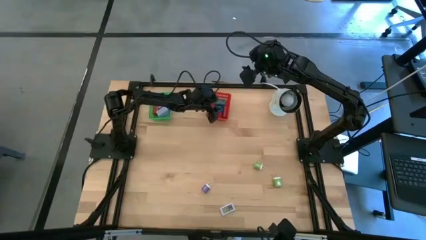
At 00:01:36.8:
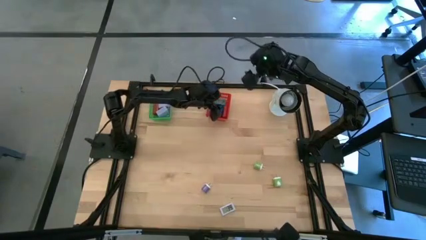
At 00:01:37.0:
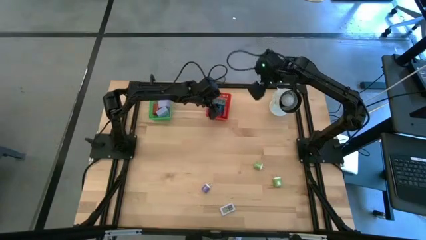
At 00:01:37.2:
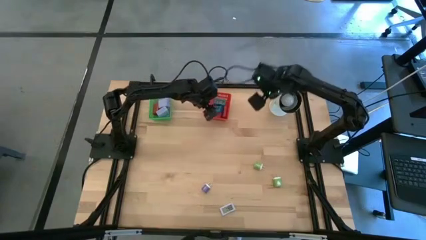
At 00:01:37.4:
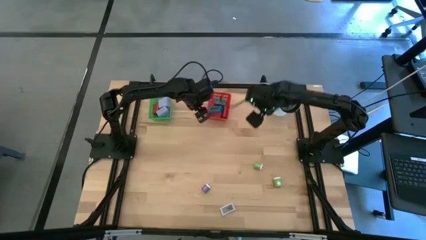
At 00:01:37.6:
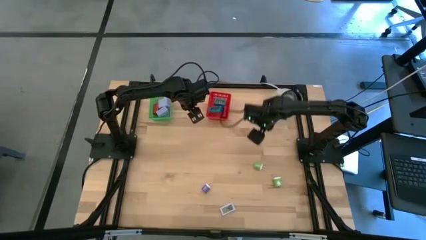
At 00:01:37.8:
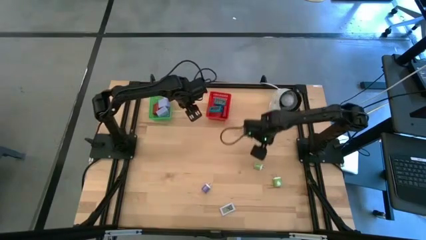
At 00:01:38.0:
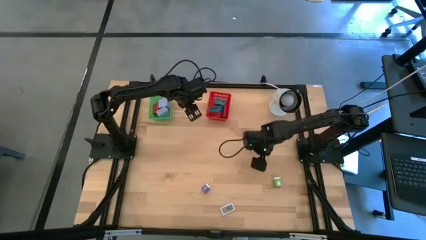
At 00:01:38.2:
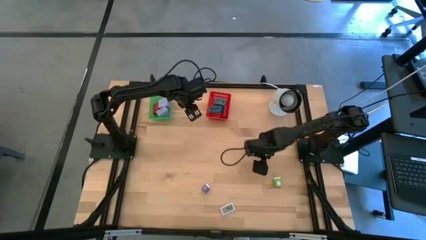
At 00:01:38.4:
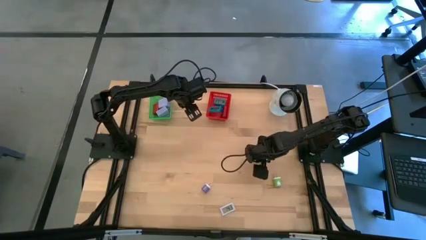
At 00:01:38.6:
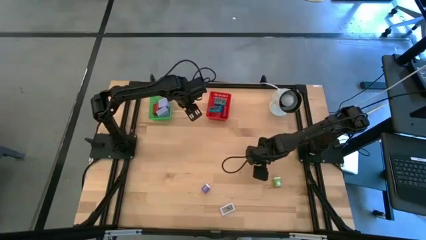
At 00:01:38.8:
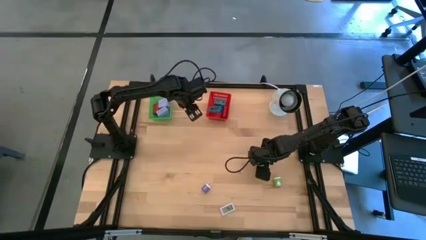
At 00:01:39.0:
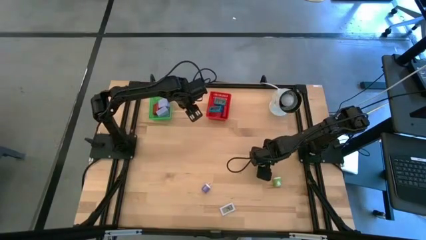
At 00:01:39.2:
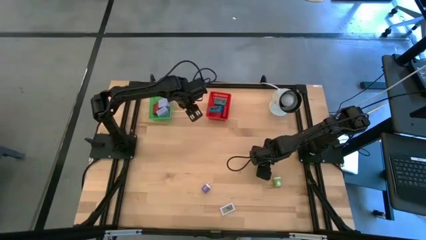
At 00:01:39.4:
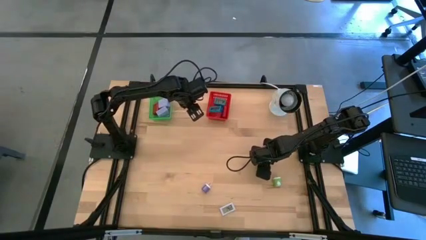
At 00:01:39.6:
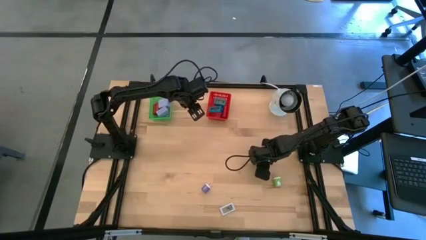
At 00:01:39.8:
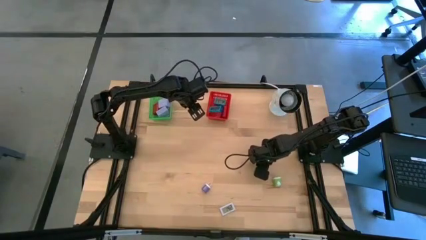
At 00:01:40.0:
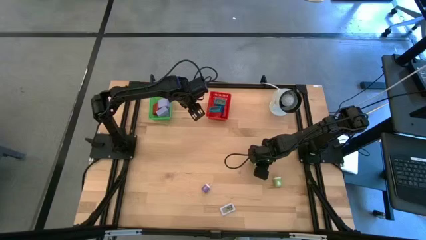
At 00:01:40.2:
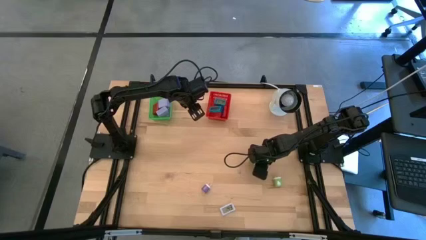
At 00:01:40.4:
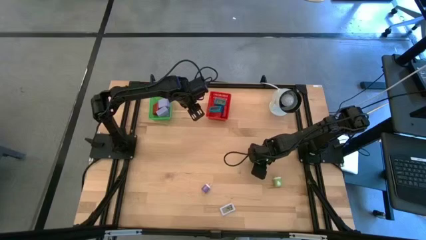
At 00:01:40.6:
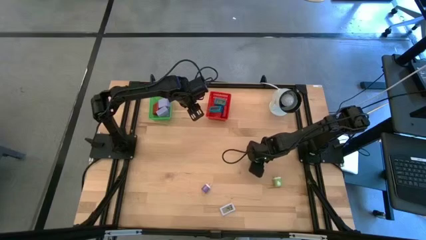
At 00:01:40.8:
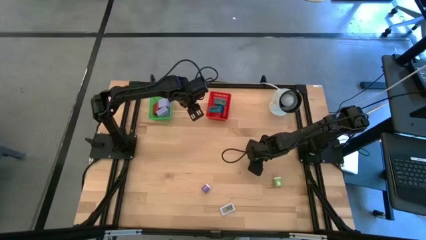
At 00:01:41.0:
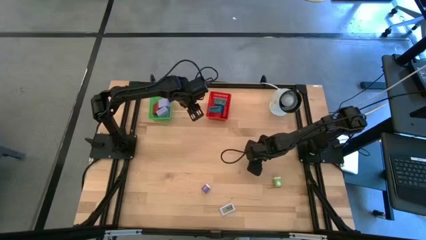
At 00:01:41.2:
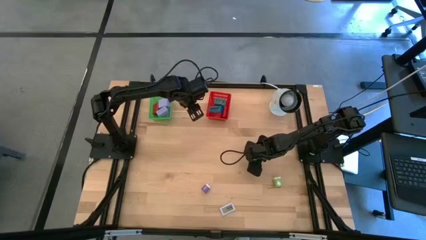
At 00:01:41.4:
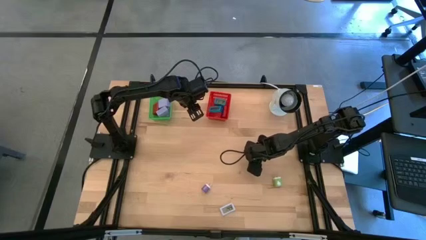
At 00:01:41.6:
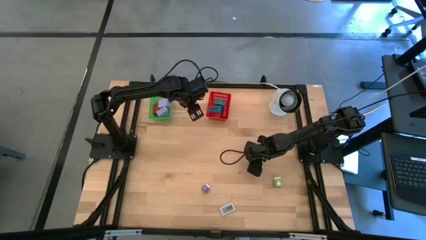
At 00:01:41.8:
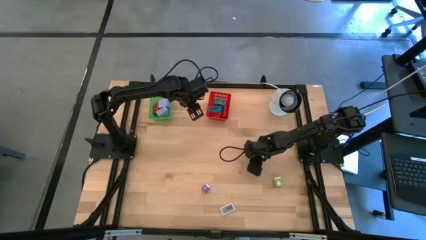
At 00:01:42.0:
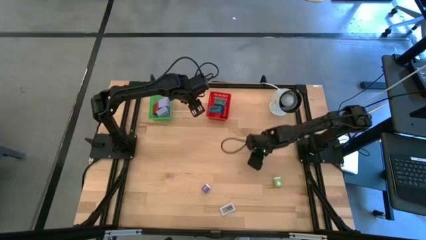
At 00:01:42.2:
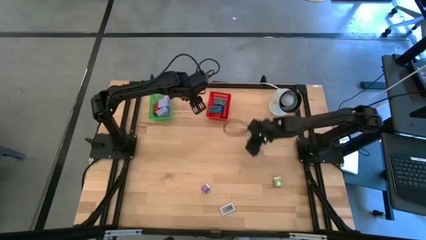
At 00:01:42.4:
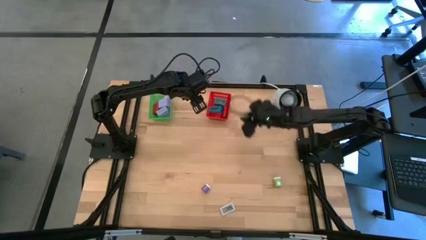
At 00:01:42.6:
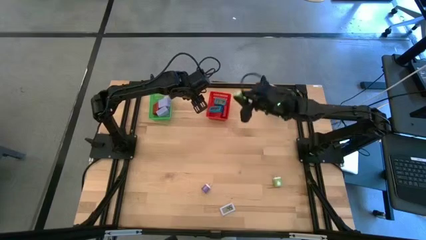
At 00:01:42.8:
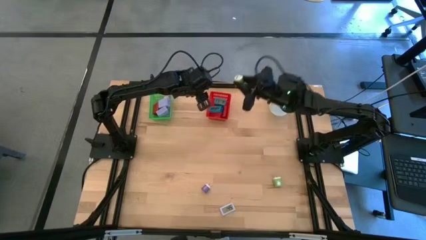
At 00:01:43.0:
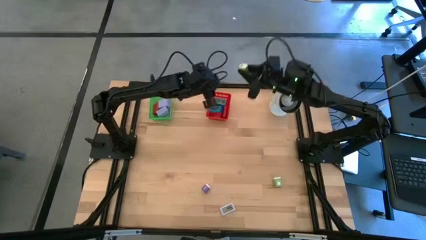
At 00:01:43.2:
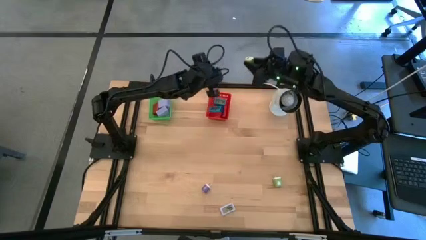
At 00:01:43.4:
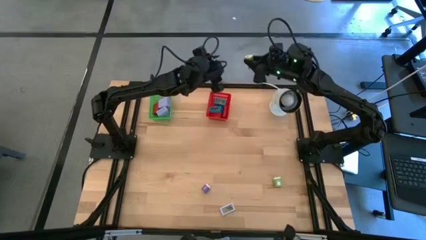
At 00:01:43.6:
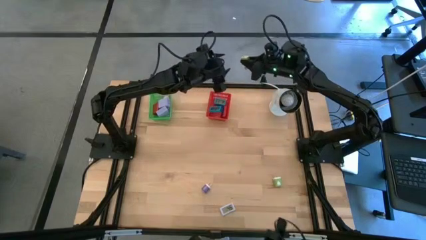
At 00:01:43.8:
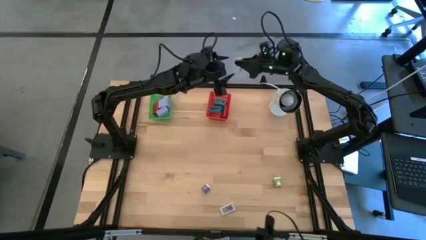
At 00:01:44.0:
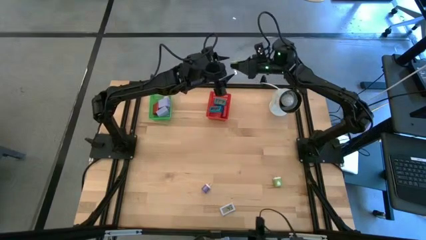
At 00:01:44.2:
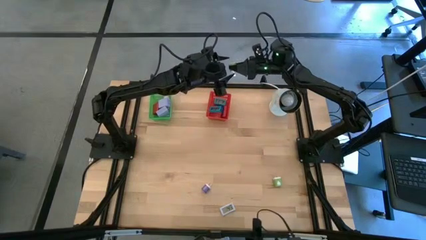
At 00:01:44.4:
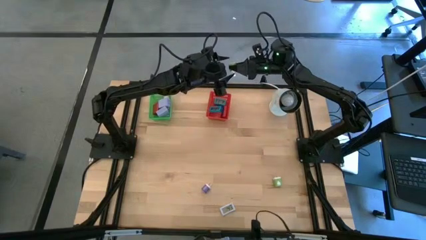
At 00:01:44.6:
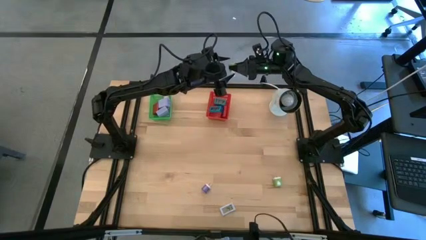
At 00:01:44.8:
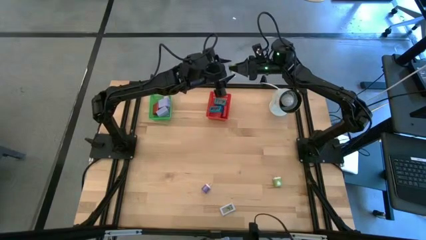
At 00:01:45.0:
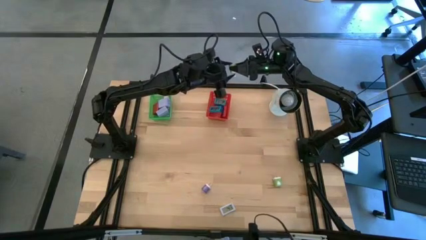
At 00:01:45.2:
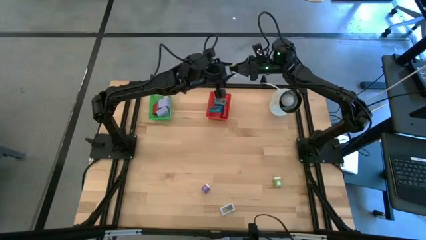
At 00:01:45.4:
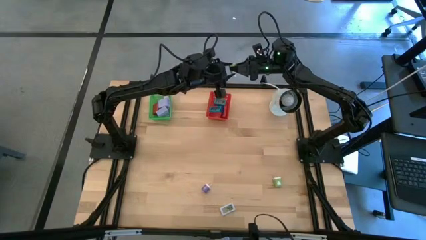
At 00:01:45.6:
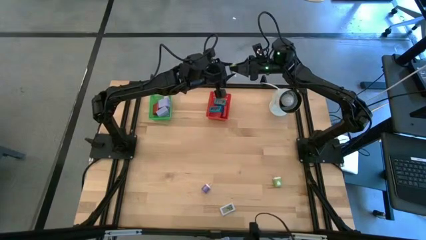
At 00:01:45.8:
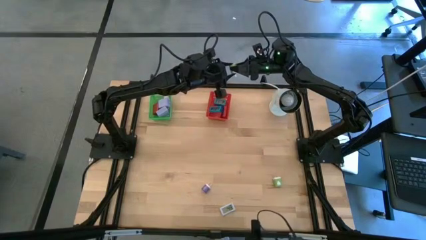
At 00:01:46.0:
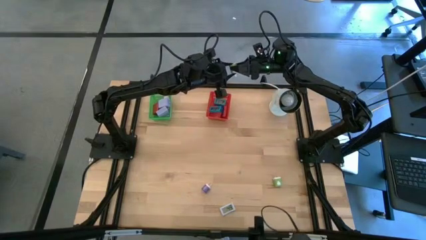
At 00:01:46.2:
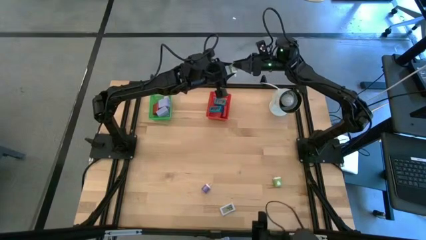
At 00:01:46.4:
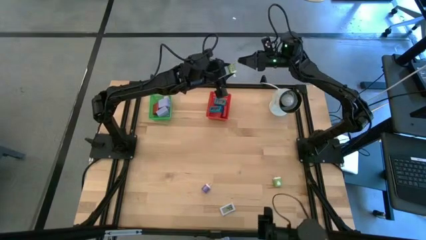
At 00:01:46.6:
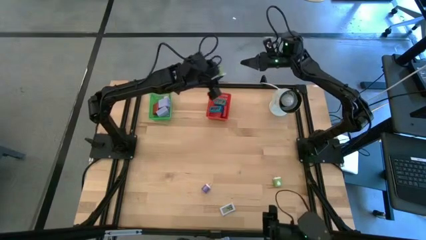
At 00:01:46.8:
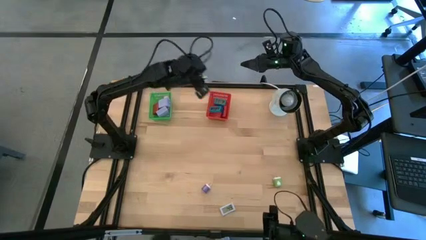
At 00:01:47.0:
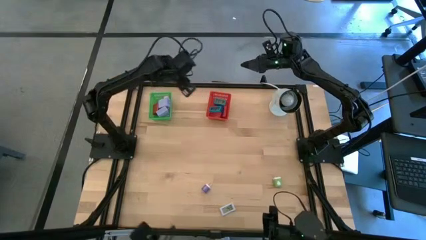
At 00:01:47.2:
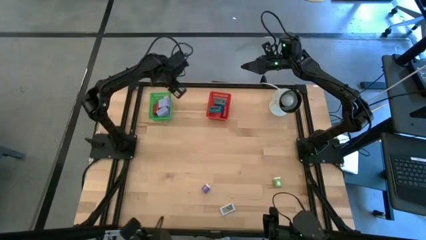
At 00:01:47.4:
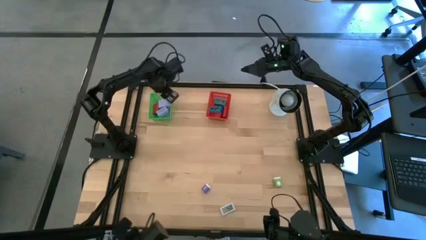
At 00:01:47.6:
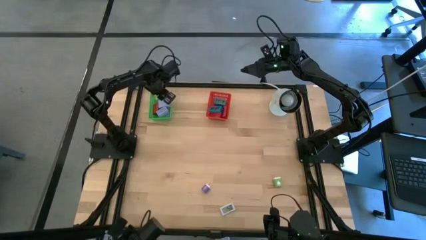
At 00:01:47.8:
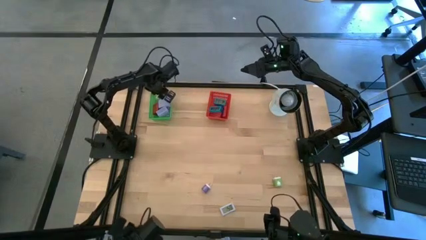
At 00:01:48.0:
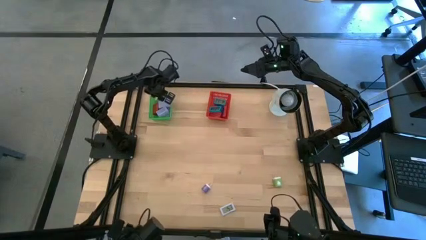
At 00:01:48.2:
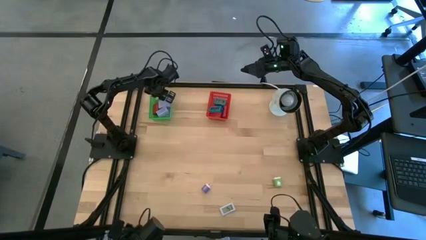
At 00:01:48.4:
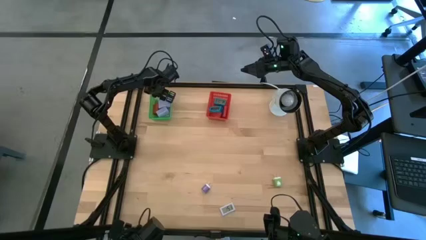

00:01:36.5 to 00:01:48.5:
Task: Pick & Place Office items
Put the top green charger adapter into the green bin

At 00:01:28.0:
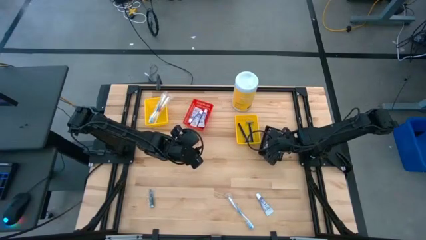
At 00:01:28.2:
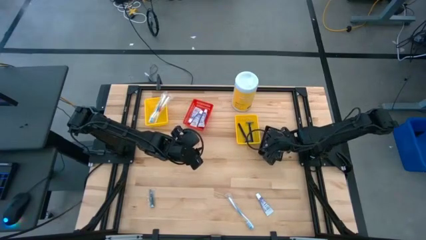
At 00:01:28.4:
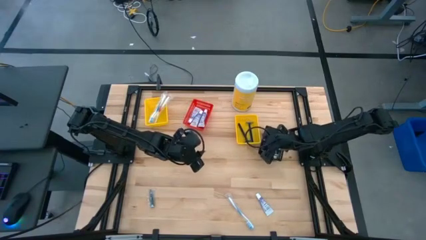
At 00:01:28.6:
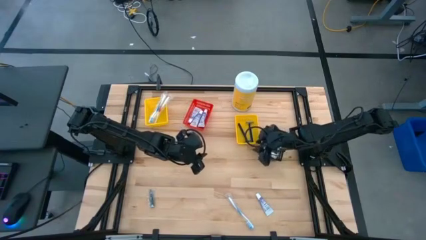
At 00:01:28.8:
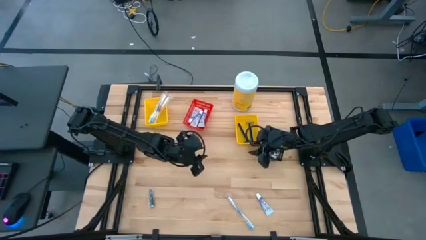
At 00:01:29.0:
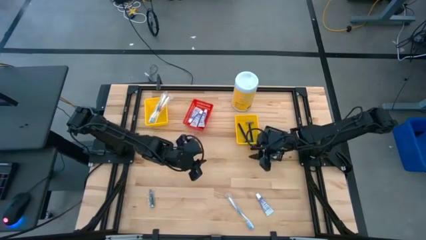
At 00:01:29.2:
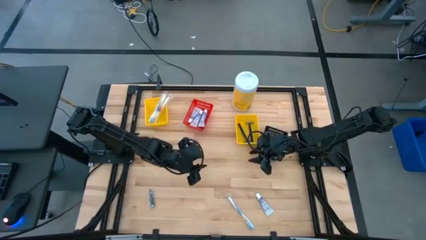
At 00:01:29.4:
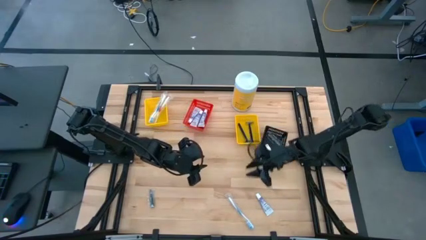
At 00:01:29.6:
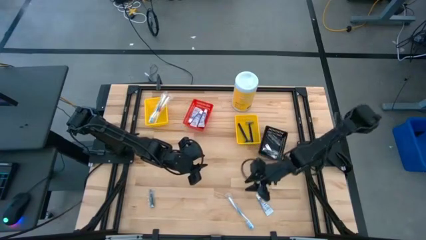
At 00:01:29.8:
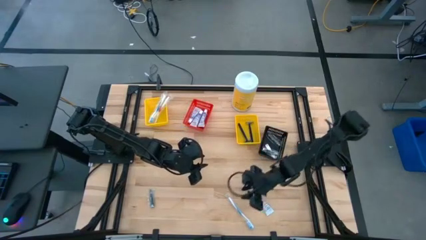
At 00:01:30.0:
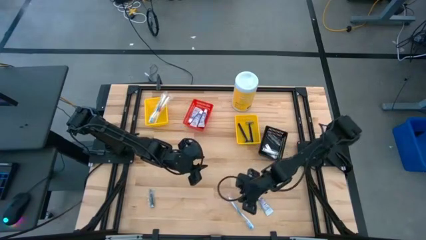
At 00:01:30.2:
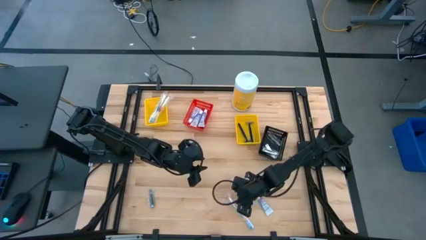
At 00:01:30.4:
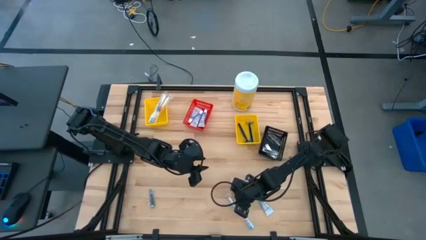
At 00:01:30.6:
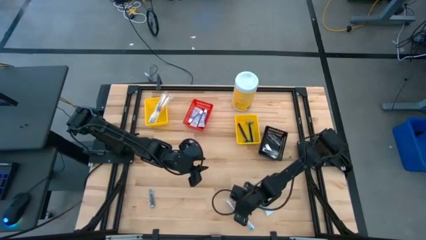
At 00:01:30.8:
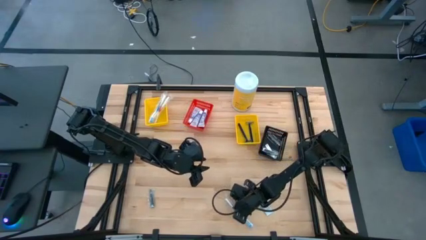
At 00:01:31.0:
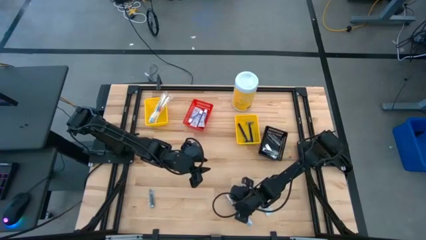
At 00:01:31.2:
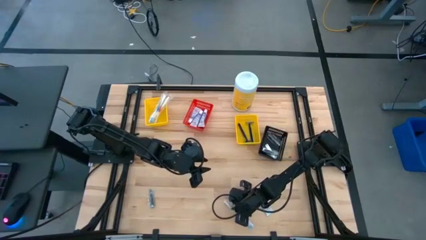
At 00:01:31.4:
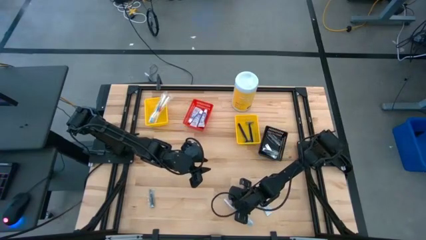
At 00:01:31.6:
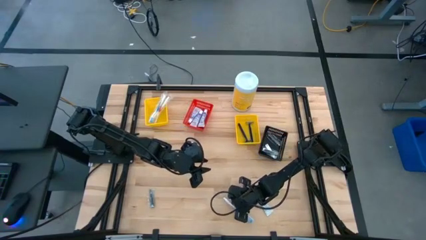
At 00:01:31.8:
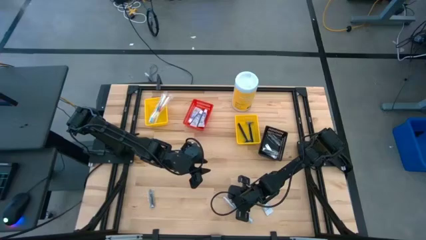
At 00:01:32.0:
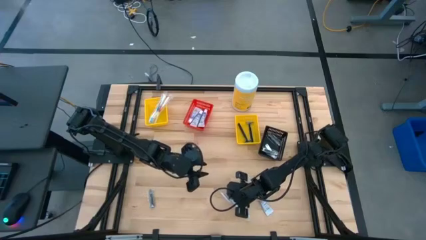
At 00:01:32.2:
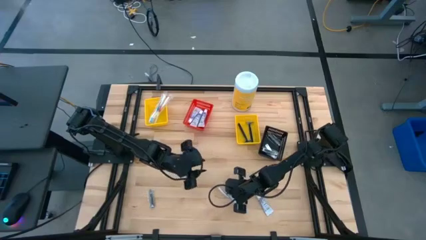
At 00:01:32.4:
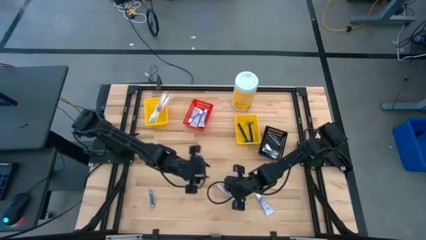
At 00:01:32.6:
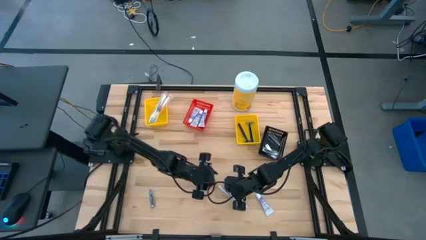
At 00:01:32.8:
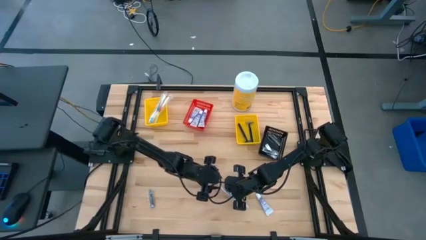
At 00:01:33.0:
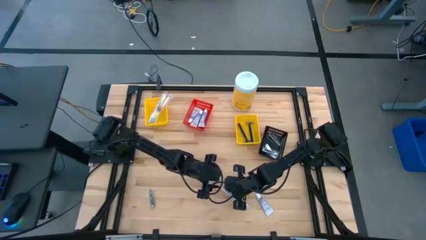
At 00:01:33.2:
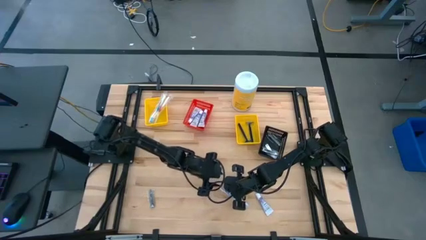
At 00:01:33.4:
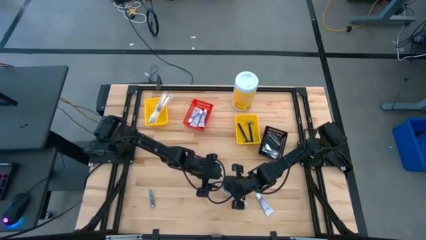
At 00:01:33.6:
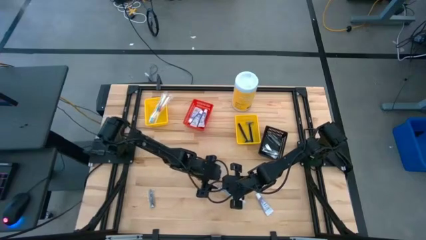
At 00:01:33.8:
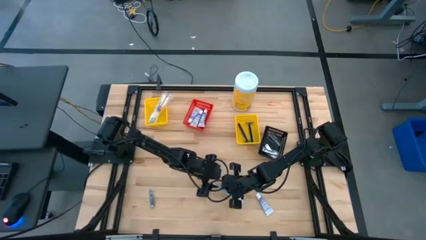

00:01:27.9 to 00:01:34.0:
Task: Pick & Place Travel size toiletries
Put the blue toothbrush into the left yellow basket
